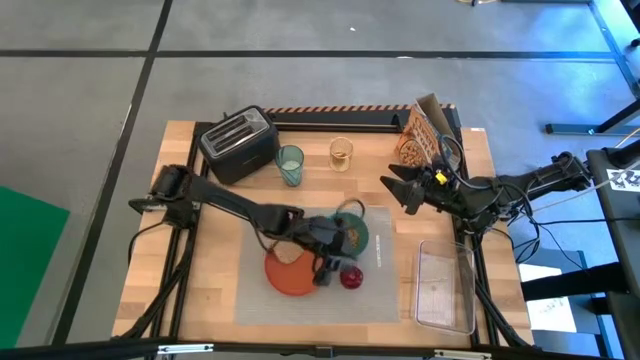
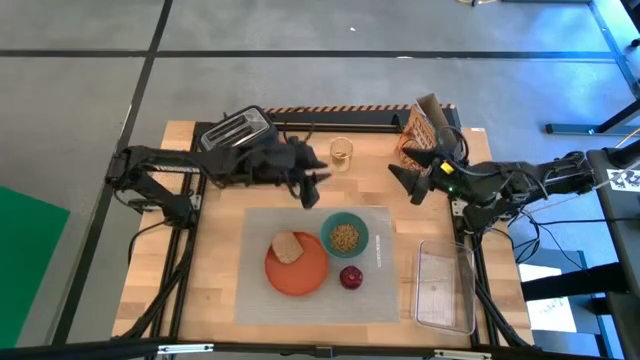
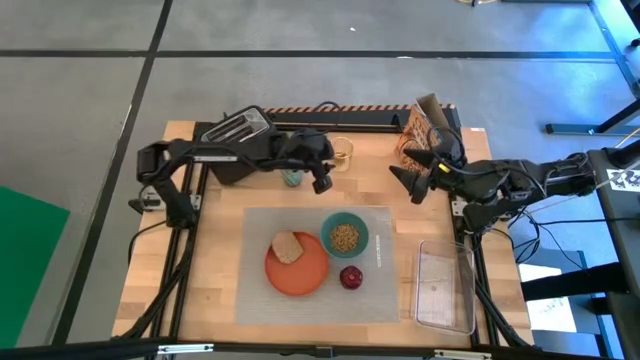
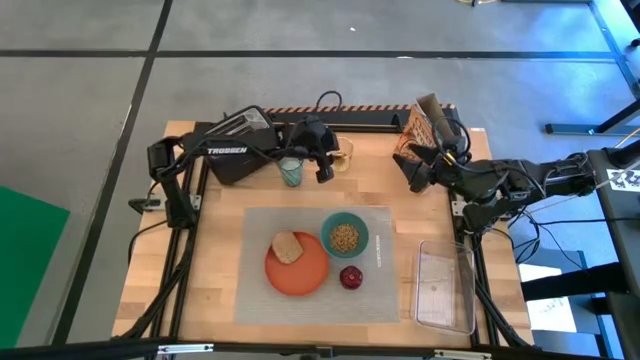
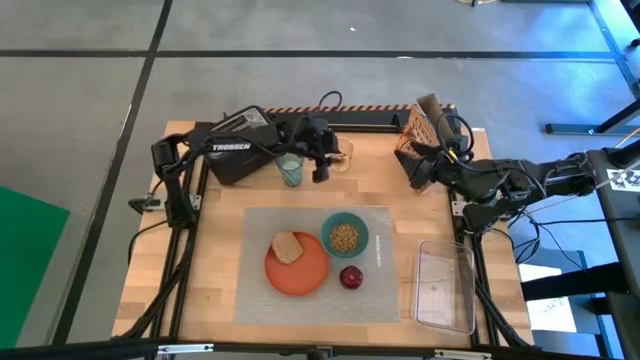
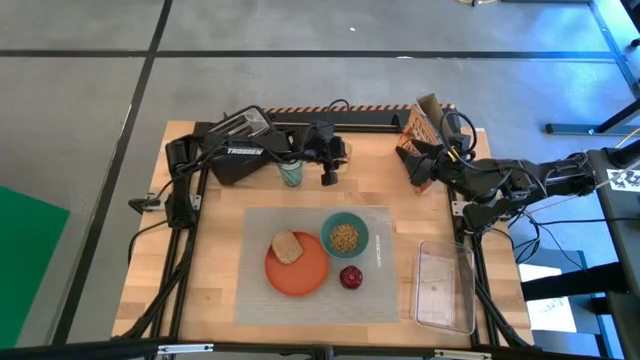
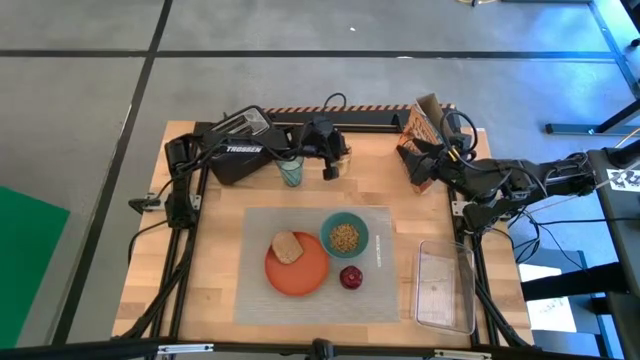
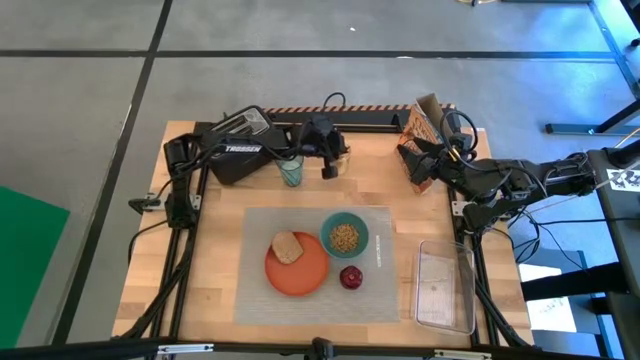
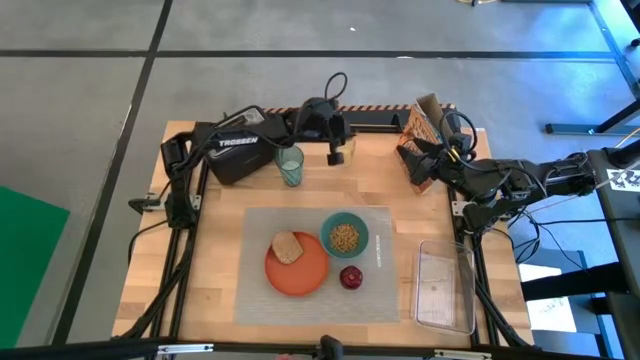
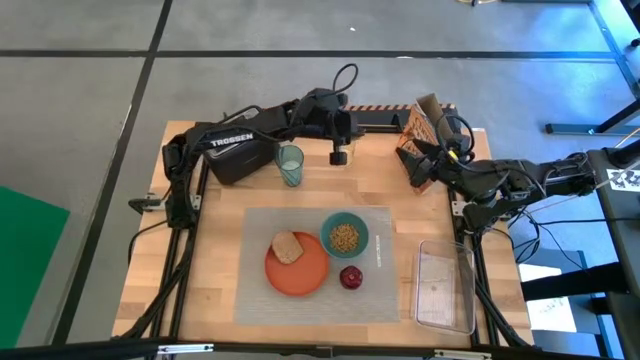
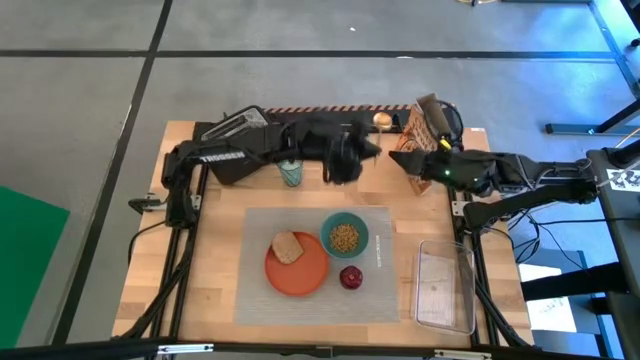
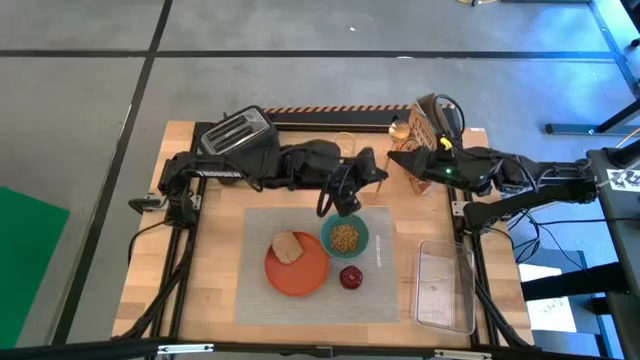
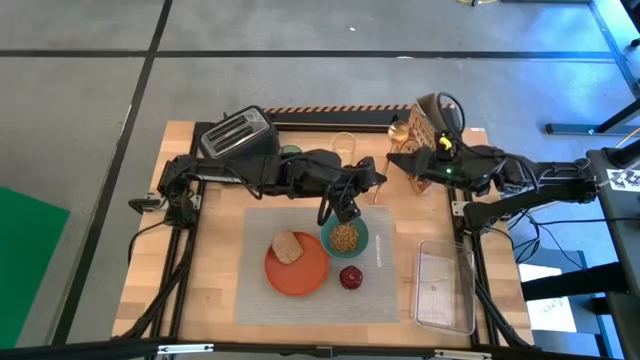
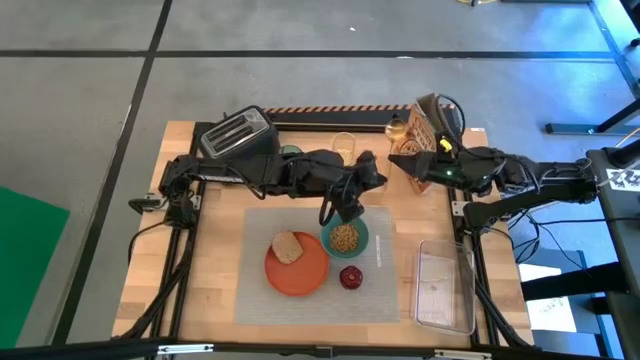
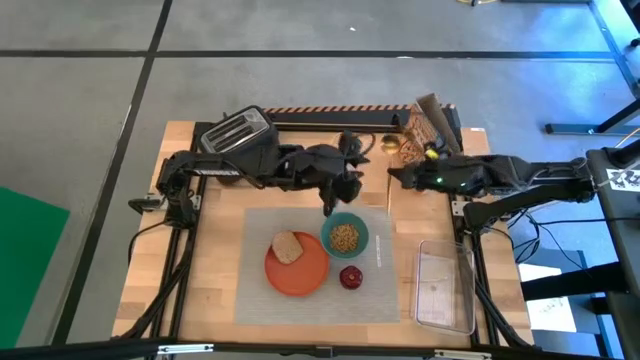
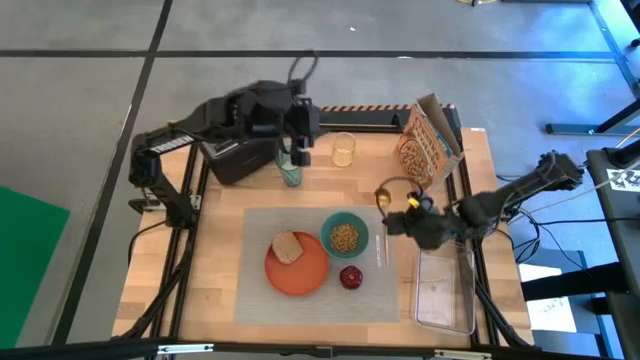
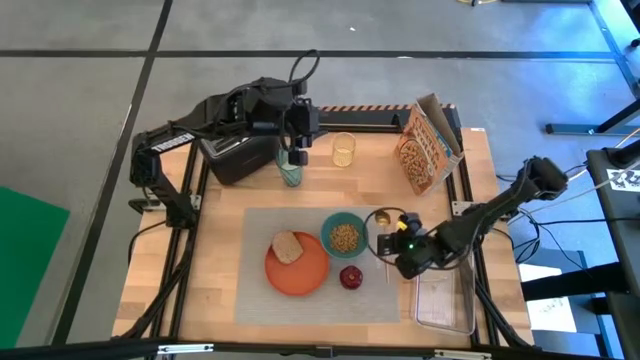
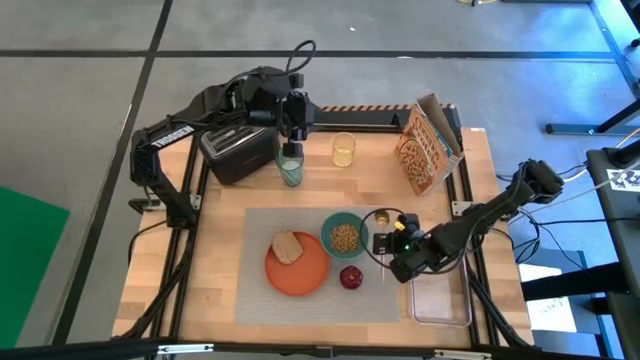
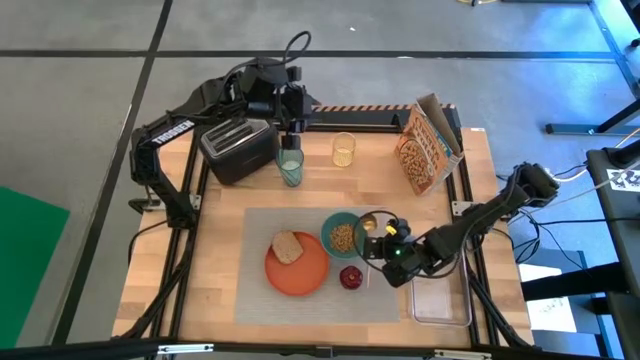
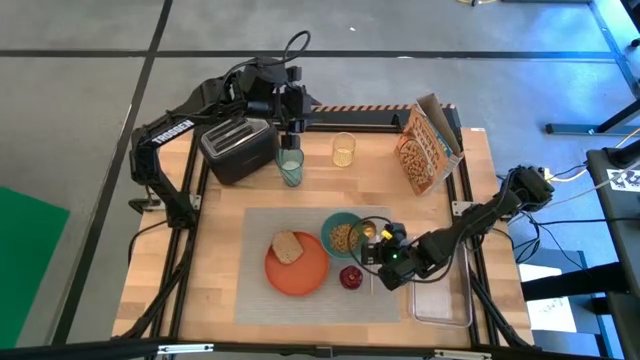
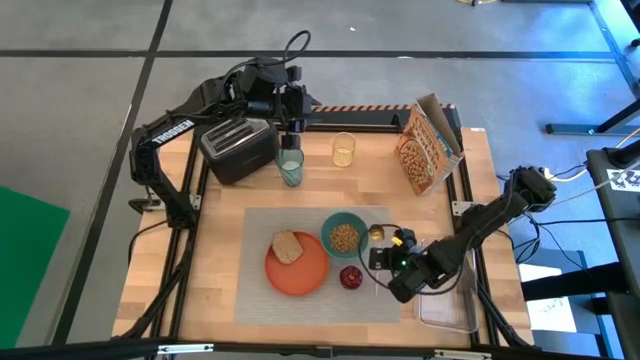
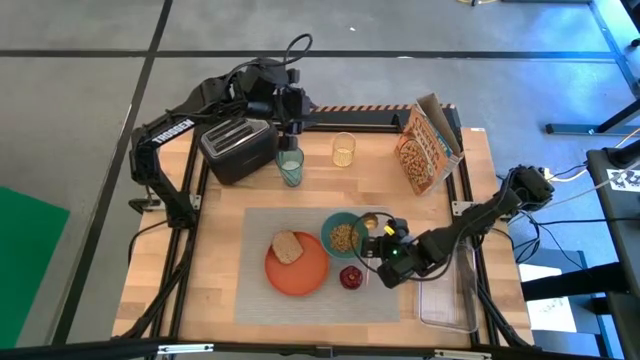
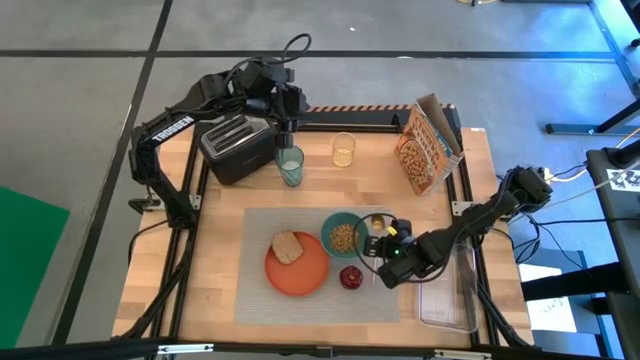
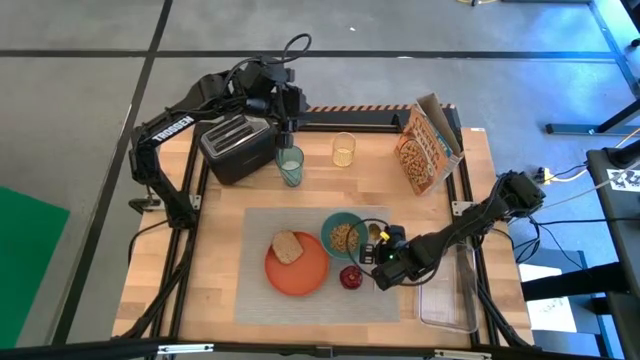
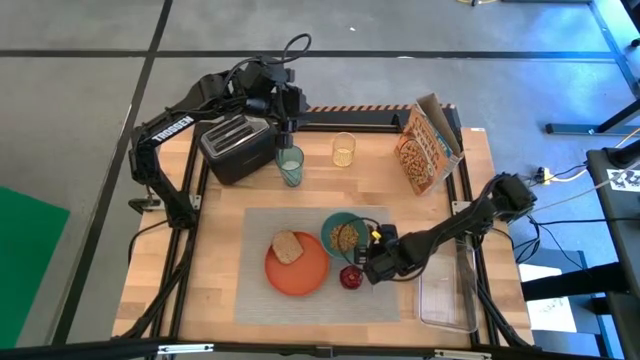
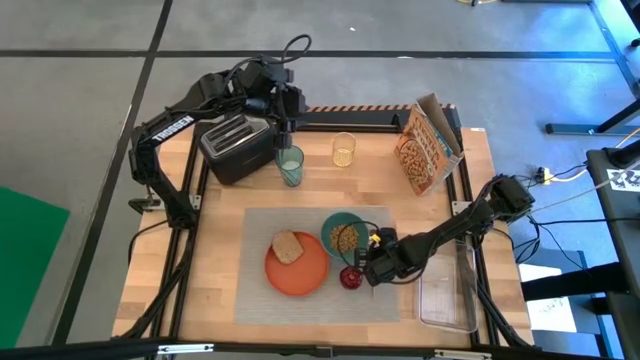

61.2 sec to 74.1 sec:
Task: Arrange a breakfast setting
Put the spoon right next to the cereal bowl on the placemat

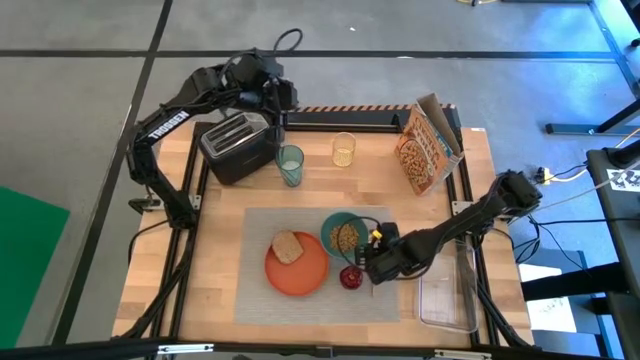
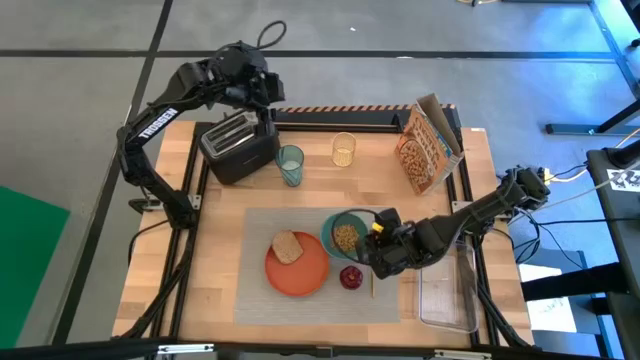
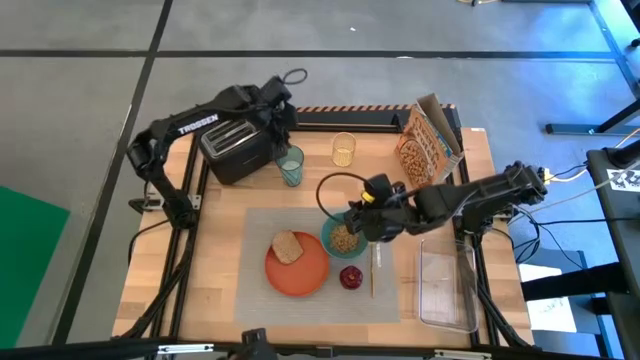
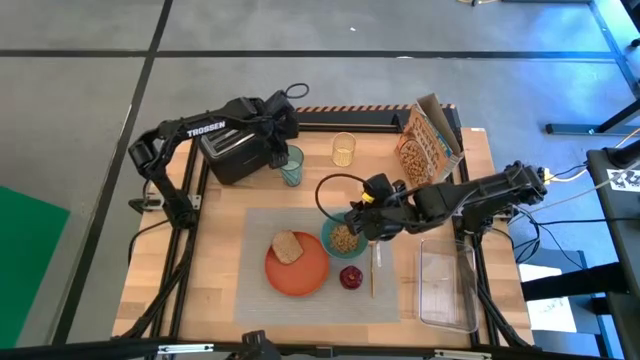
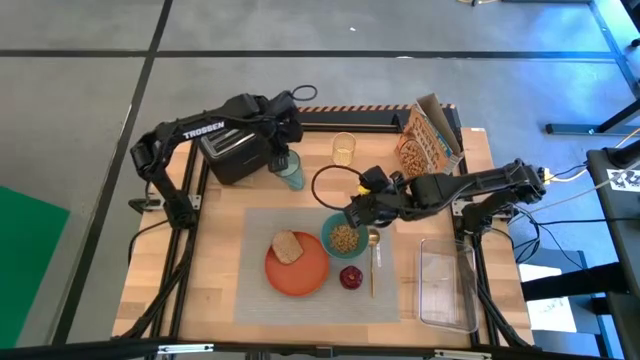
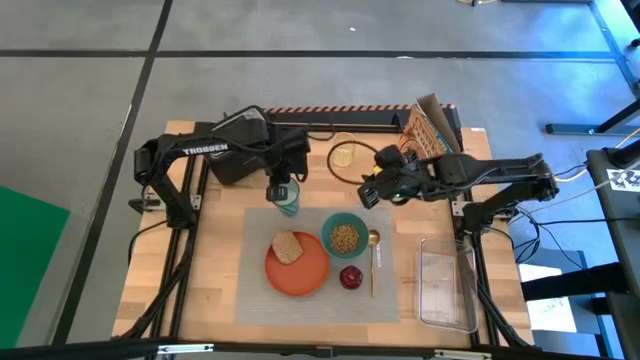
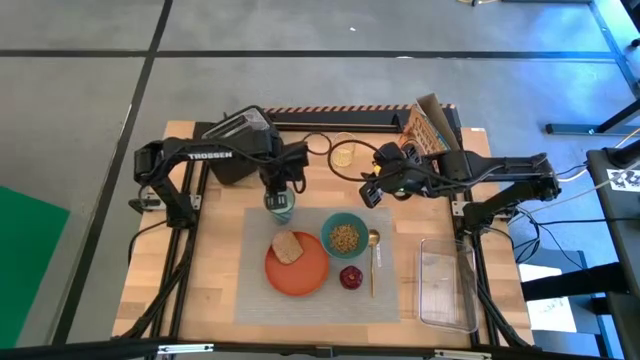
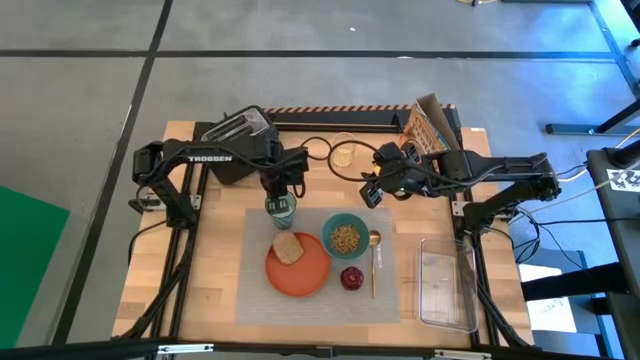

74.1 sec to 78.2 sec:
Put the glass cup with the rice grain on the placemat

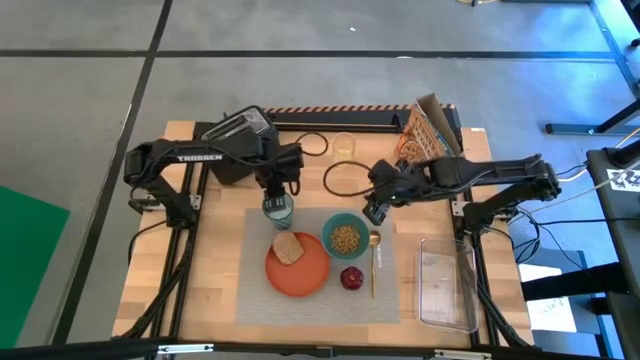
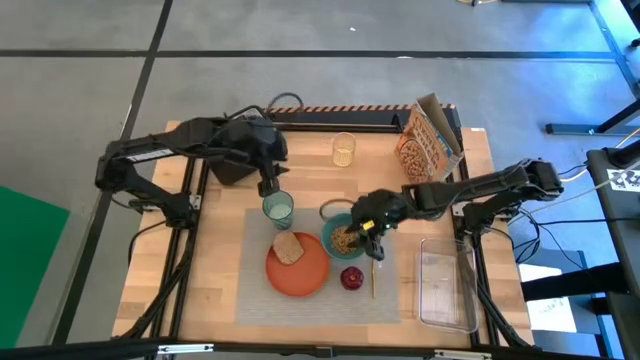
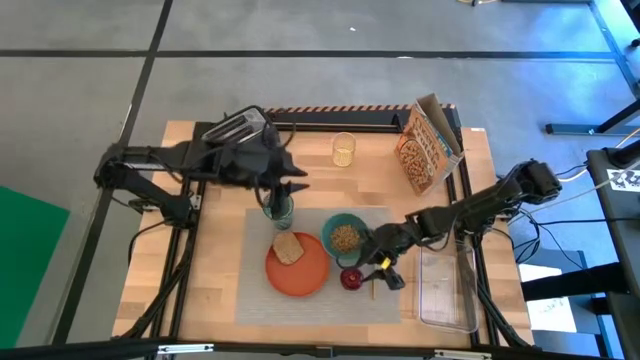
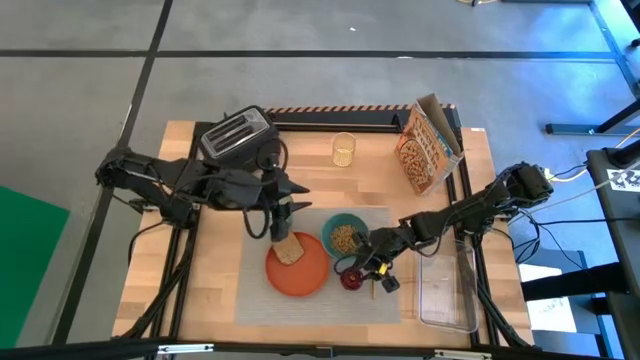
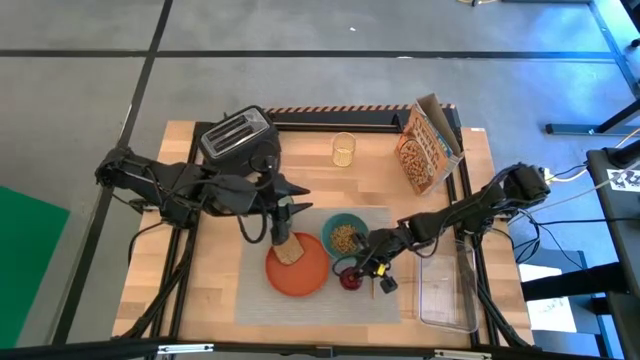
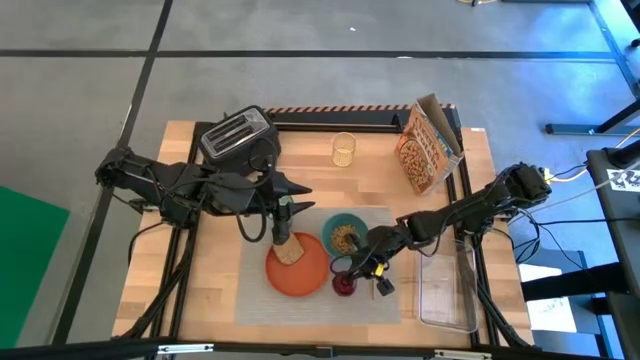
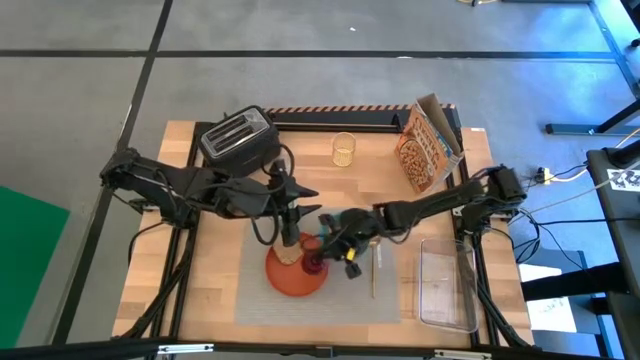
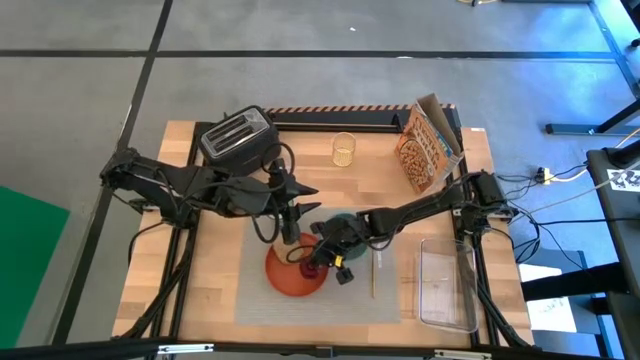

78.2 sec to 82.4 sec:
Put the apple on the plate
